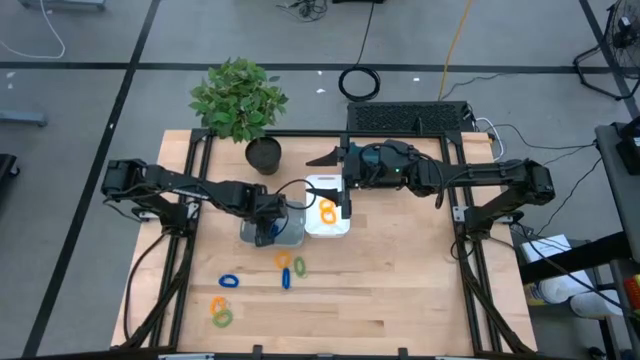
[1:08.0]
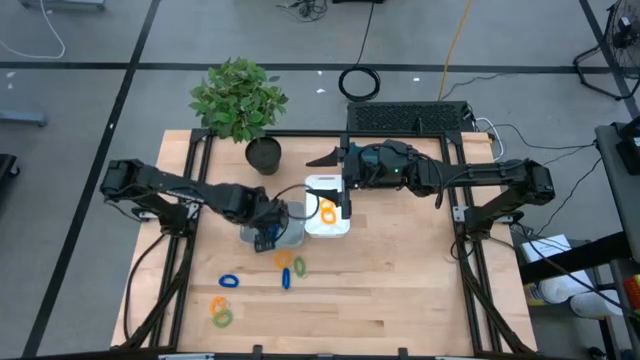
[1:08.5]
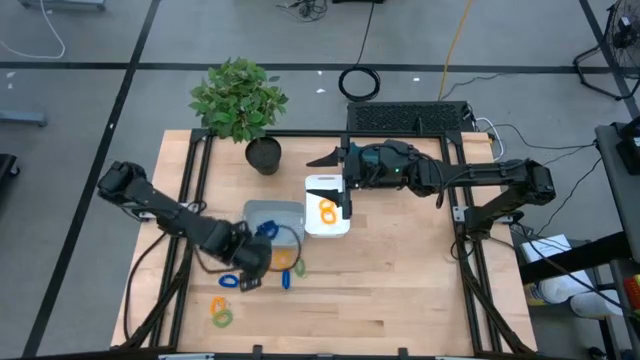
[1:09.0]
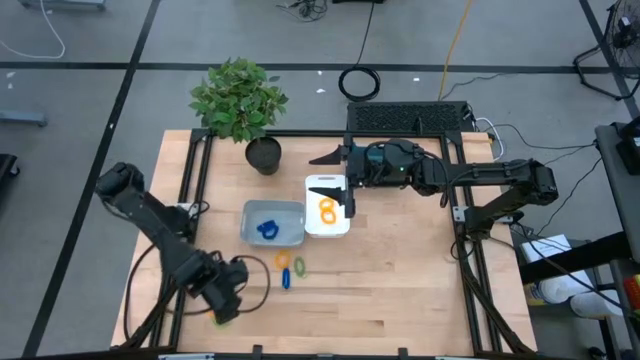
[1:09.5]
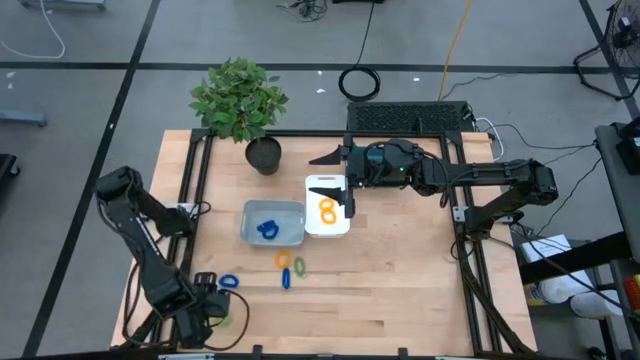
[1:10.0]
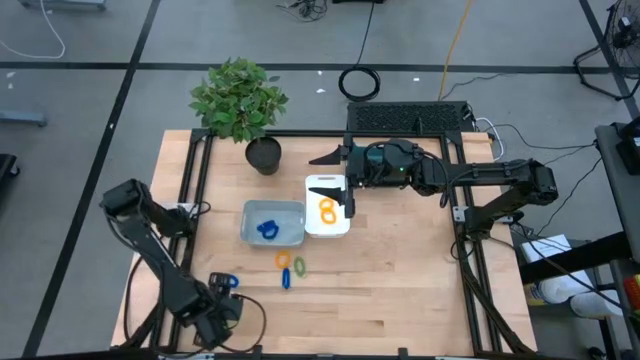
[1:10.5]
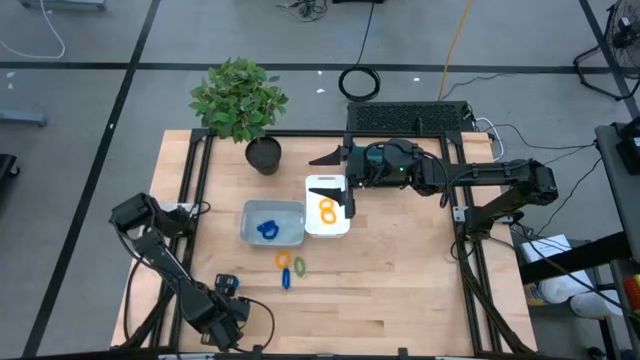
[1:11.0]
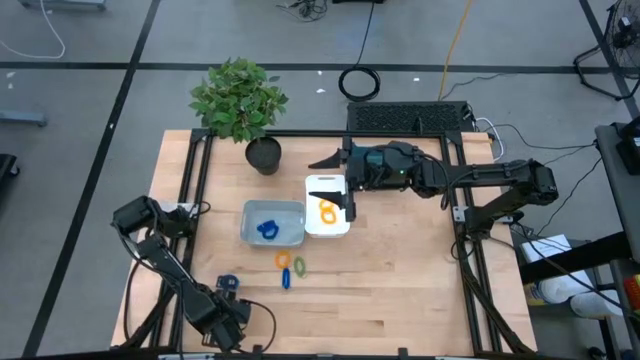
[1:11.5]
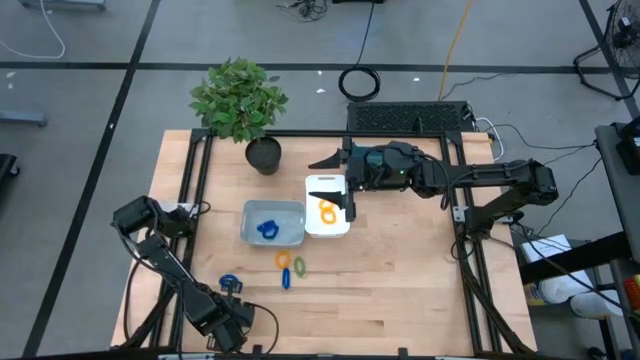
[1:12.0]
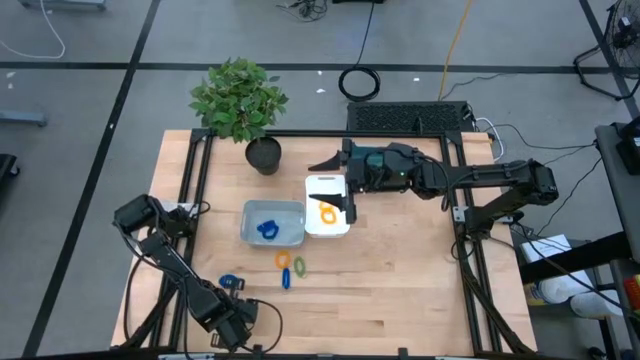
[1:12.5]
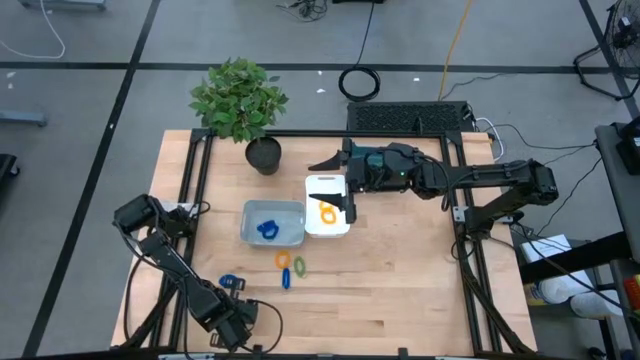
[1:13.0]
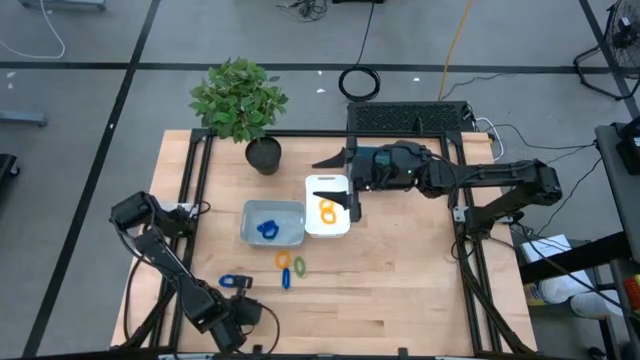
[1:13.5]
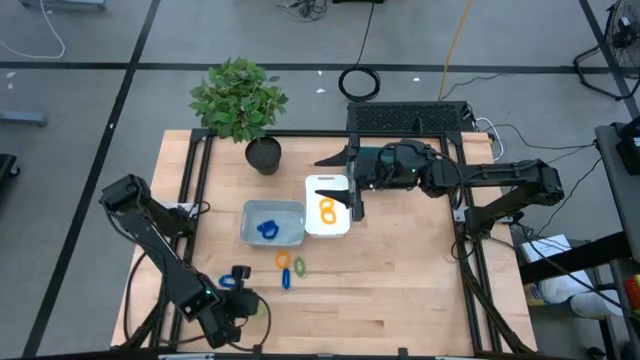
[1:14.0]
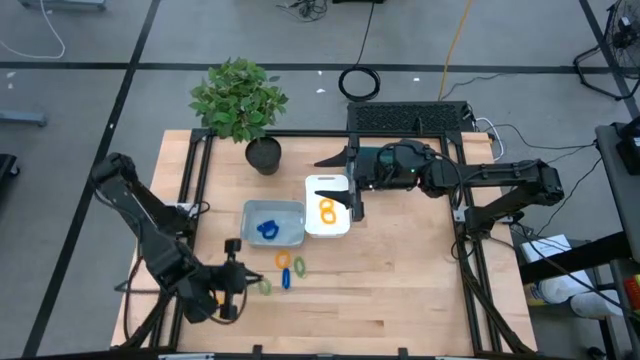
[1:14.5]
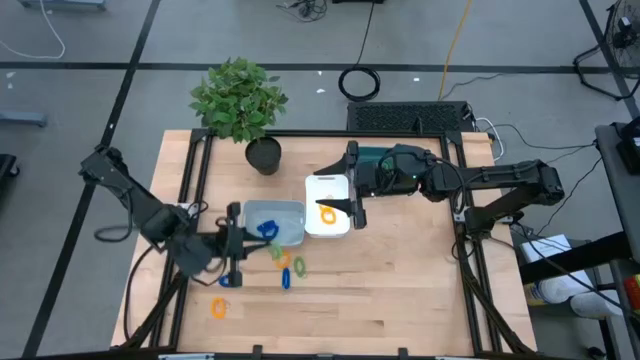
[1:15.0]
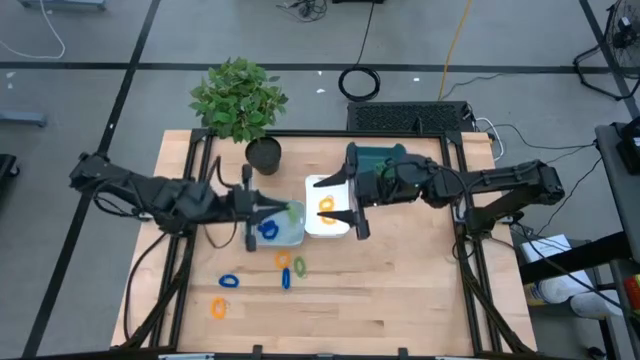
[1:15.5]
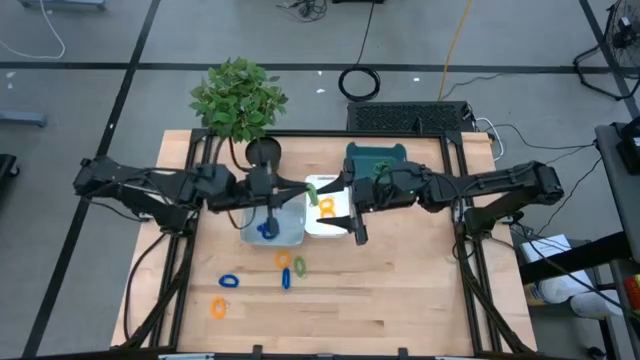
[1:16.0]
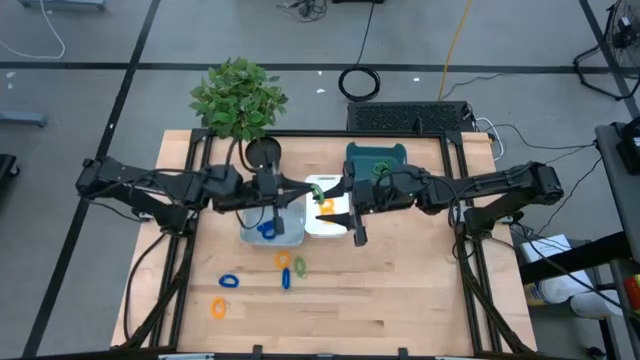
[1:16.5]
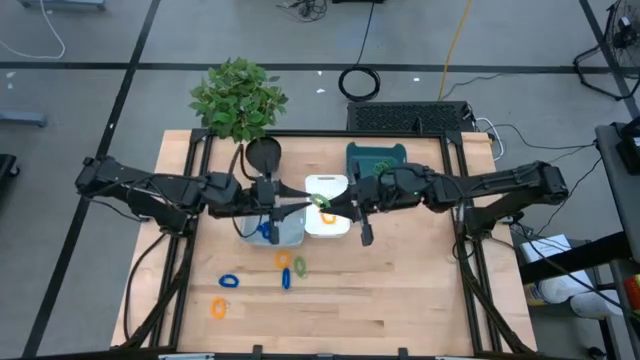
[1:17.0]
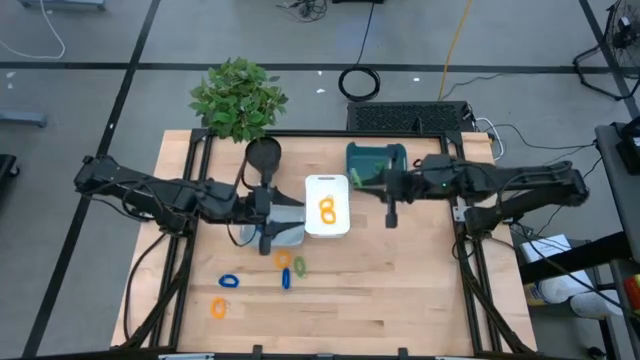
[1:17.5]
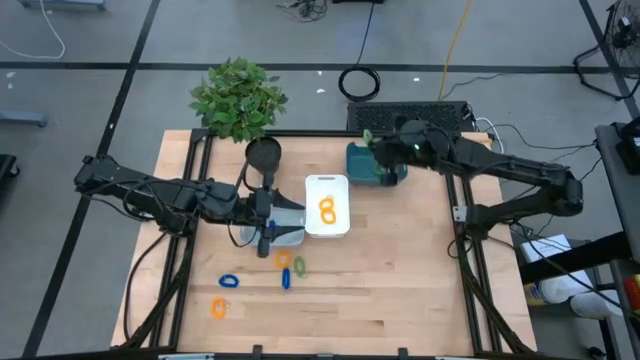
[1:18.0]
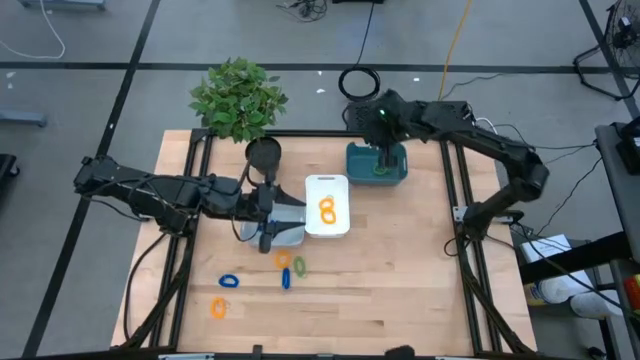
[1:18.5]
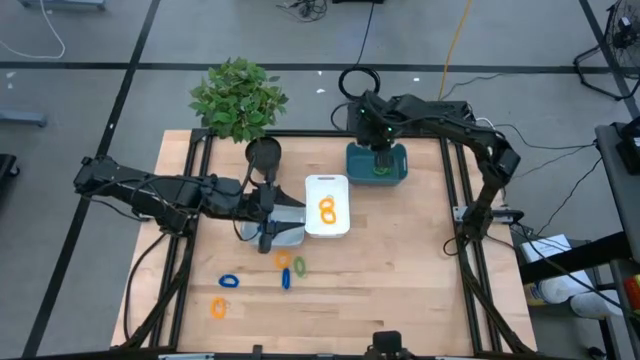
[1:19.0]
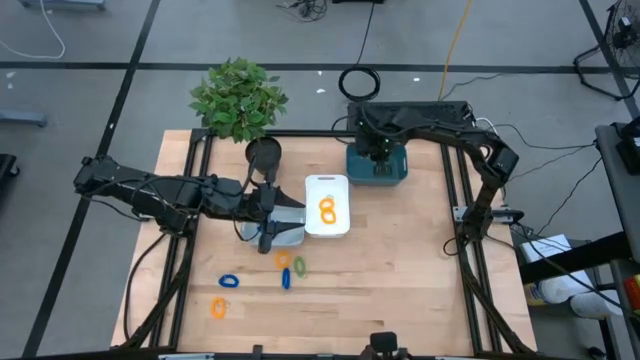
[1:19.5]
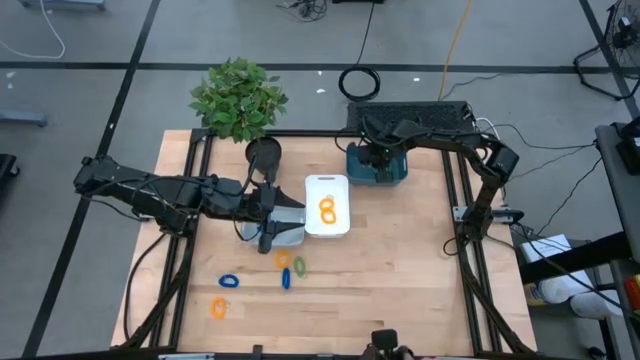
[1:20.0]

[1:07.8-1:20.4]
Task: Sort spring keychains
Put the green spring keychain into the blue bin

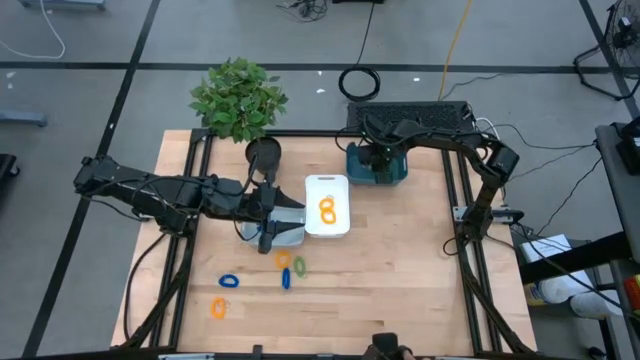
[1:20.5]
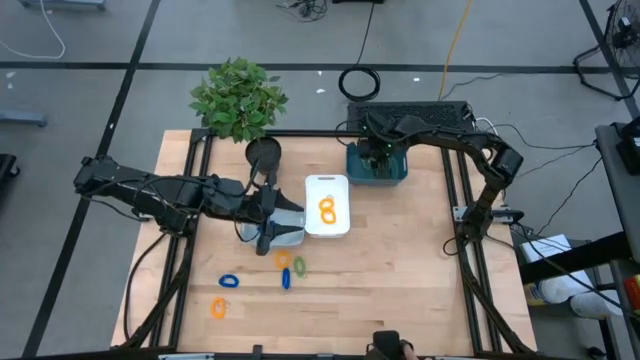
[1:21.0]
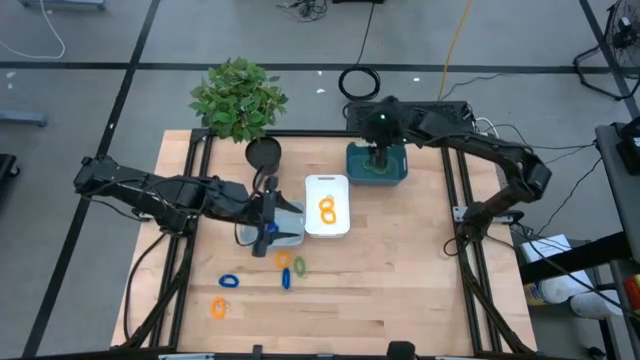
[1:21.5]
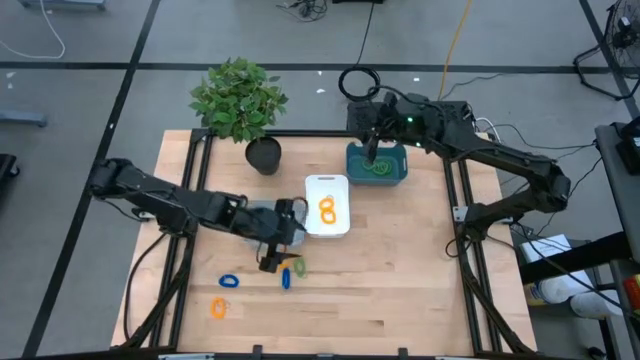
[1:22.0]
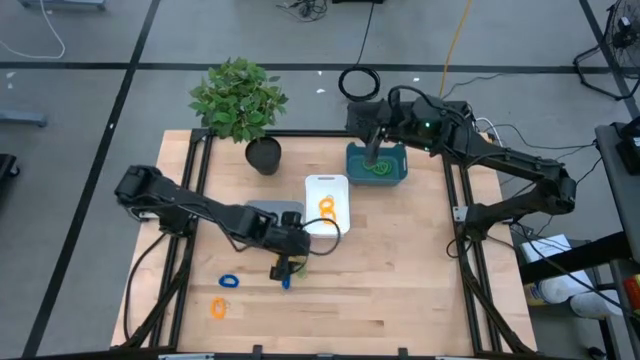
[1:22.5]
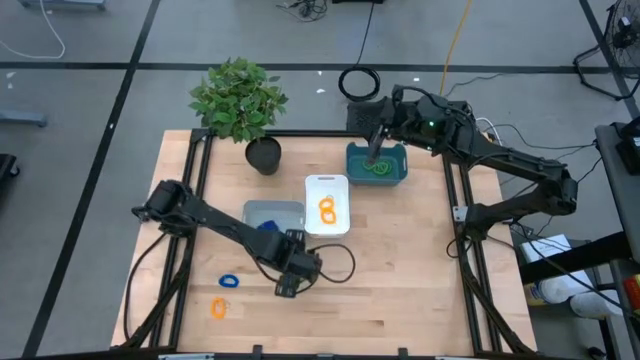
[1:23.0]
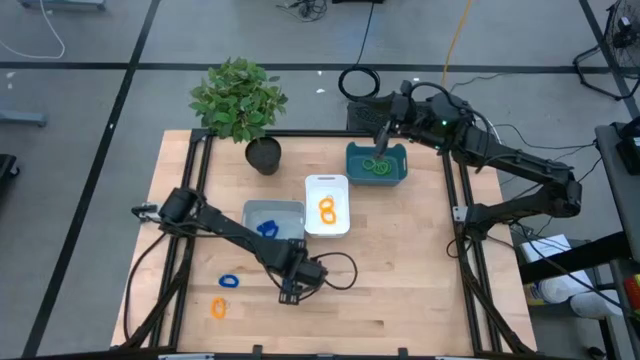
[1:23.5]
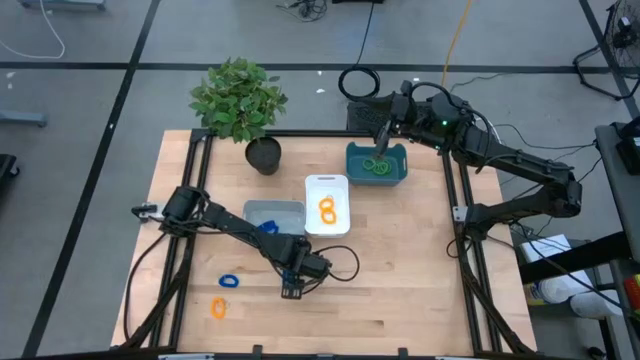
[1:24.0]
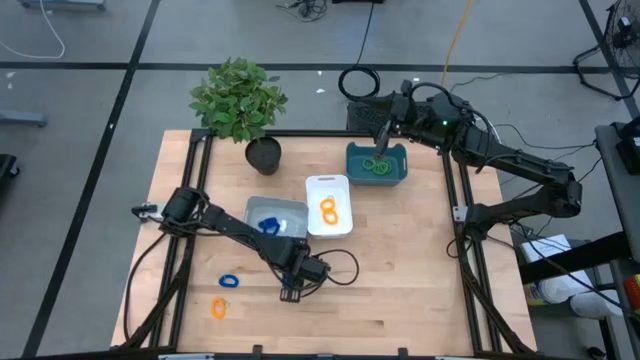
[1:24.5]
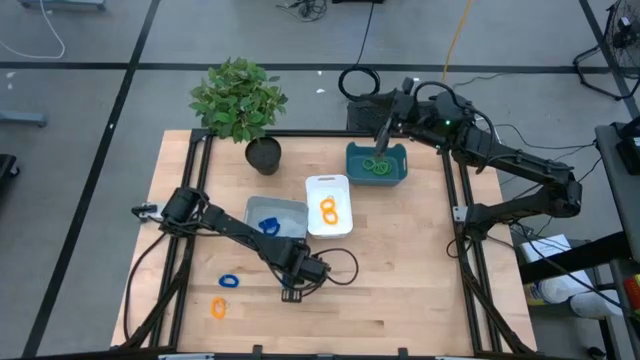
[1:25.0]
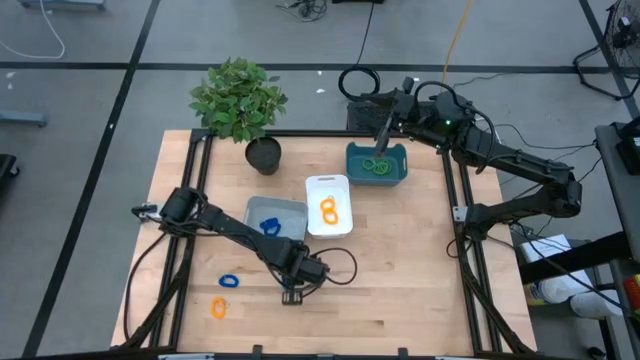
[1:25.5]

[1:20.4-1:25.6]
Put the green spring keychain into the blue bin
